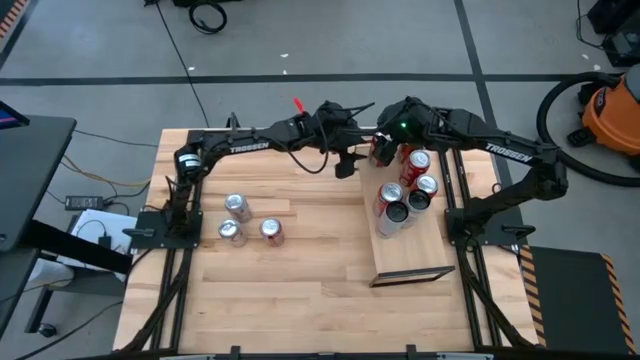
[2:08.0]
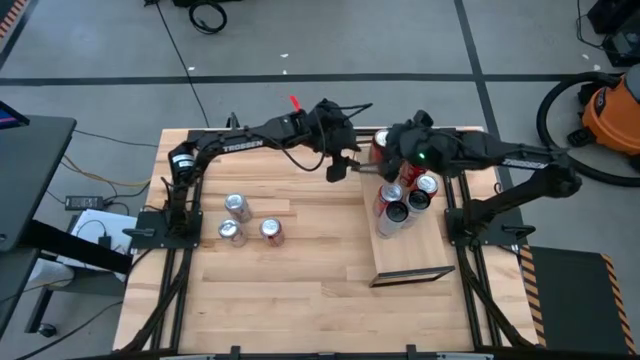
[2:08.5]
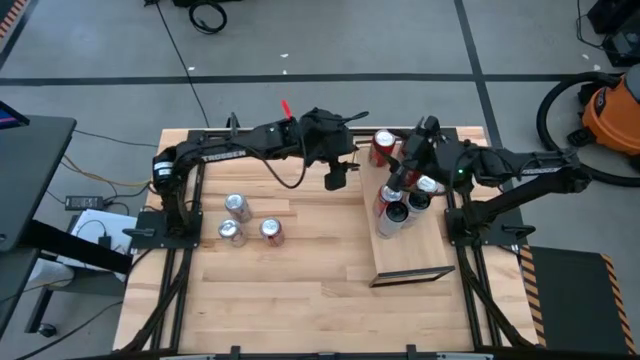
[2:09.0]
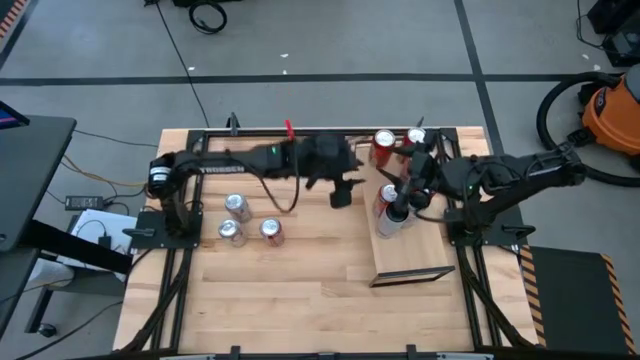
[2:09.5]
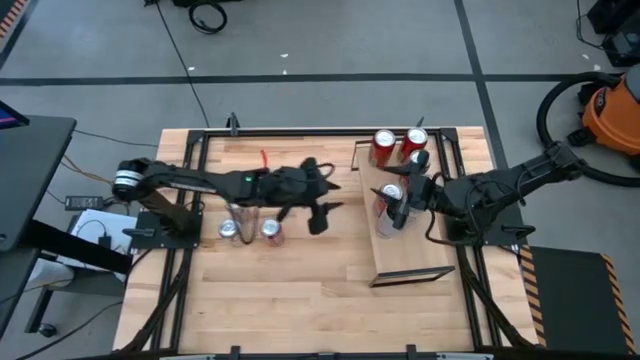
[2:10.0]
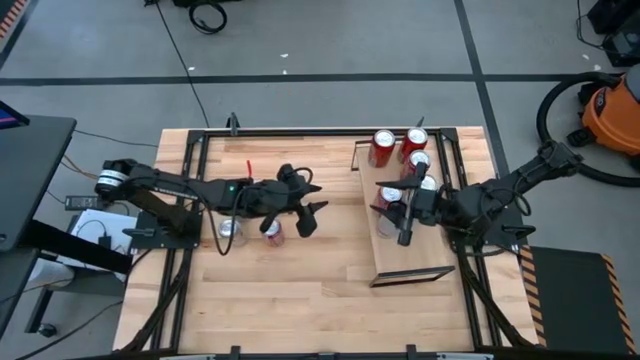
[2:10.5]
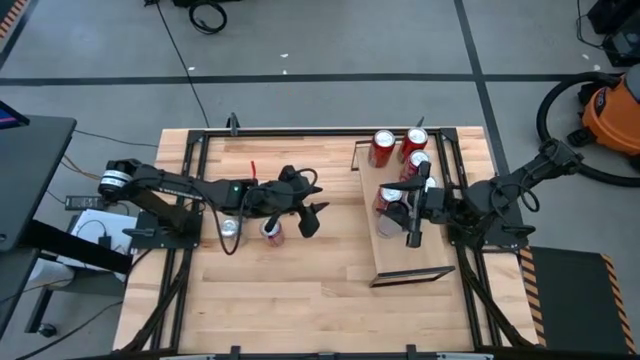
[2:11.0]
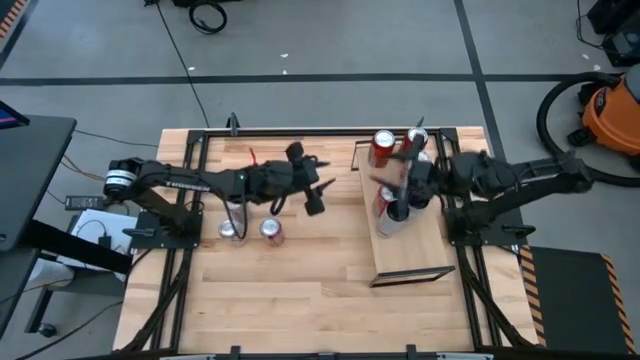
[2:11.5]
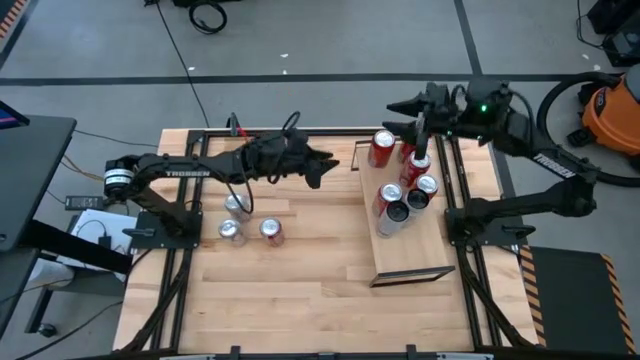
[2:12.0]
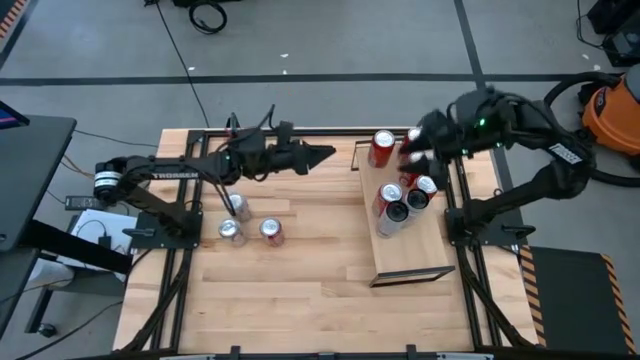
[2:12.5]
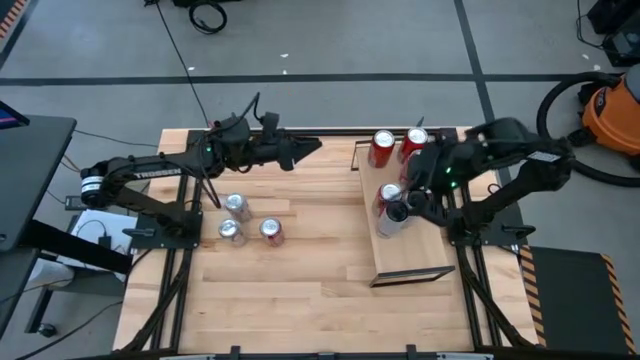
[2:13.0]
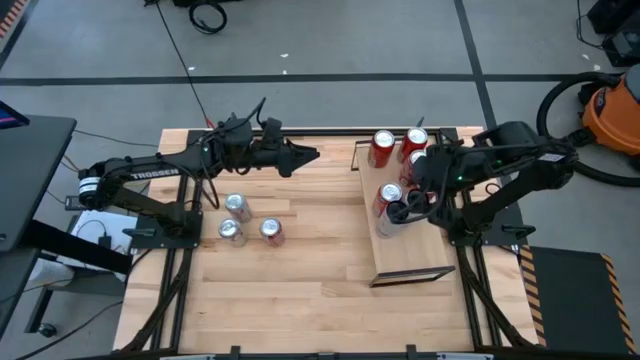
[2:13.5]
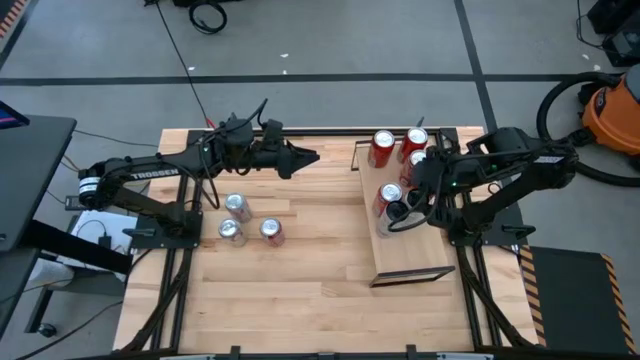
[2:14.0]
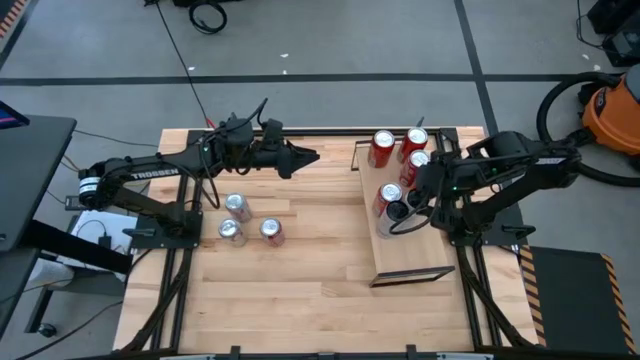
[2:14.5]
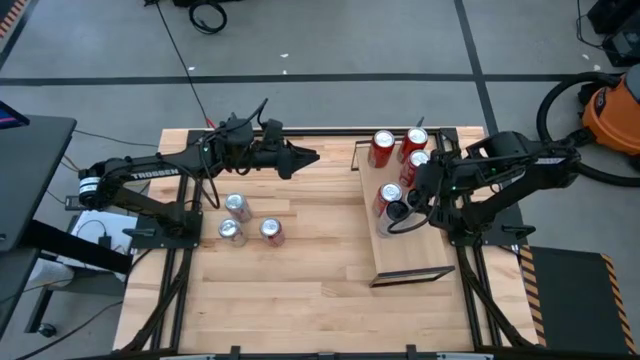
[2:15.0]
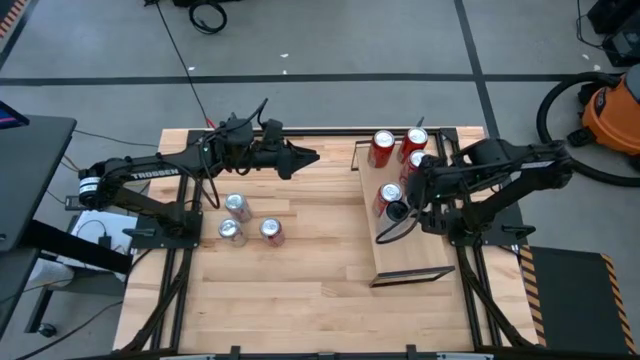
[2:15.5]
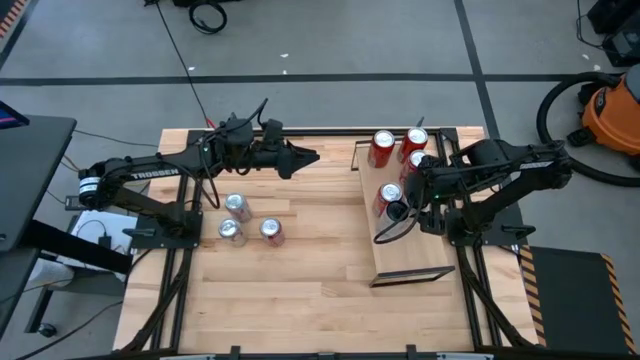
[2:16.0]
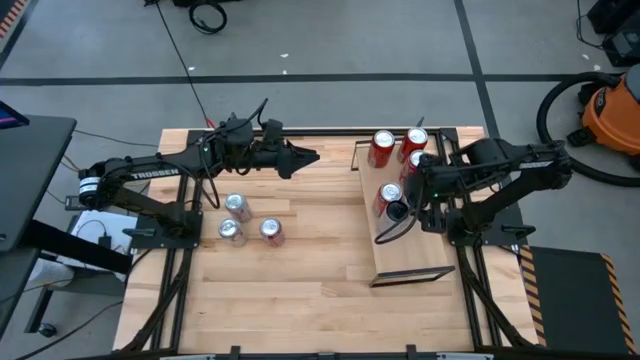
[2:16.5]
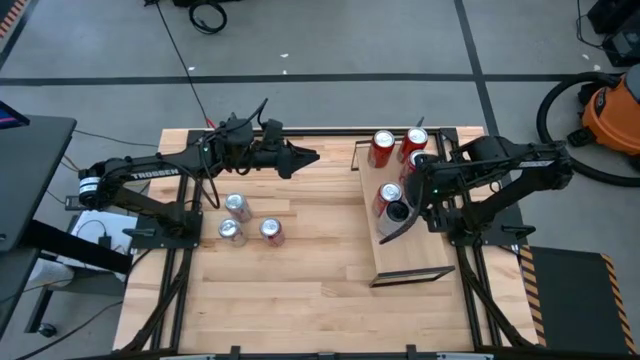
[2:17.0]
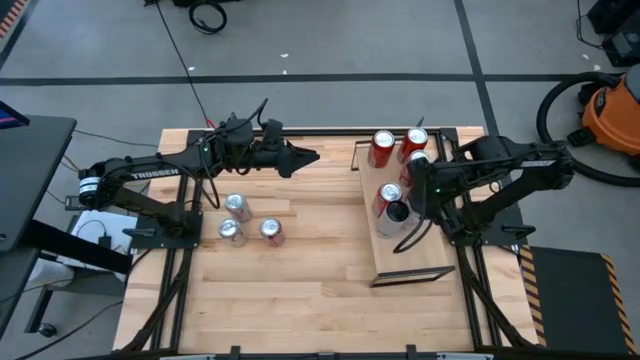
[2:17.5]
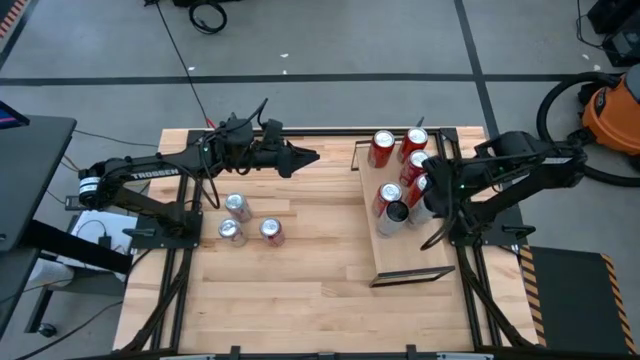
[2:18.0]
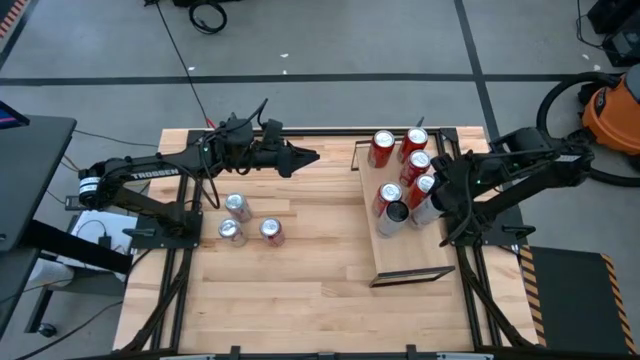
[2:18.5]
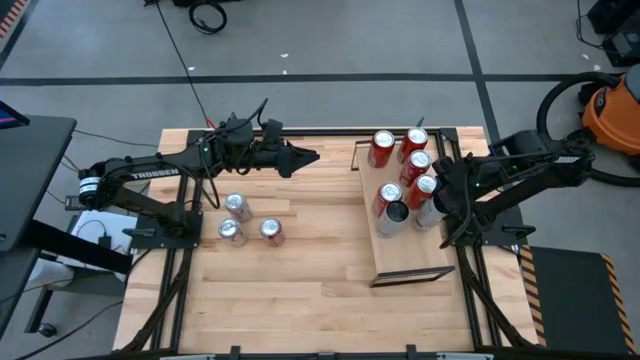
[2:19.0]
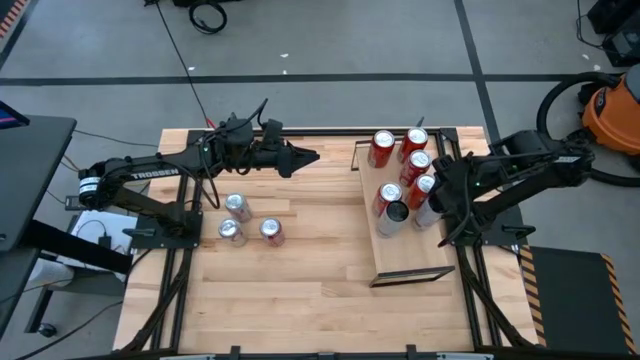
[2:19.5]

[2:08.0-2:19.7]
Task: Place canned beverage on shelf
Adjust the white pink soda can on the shelf

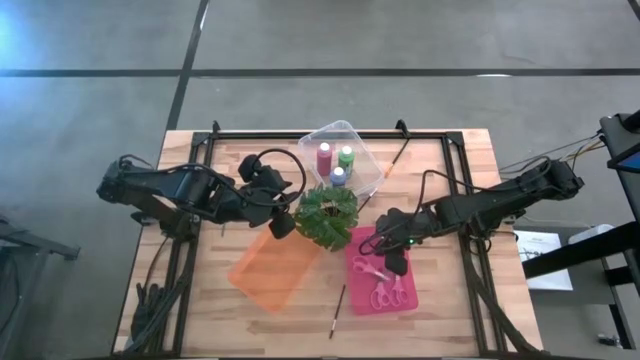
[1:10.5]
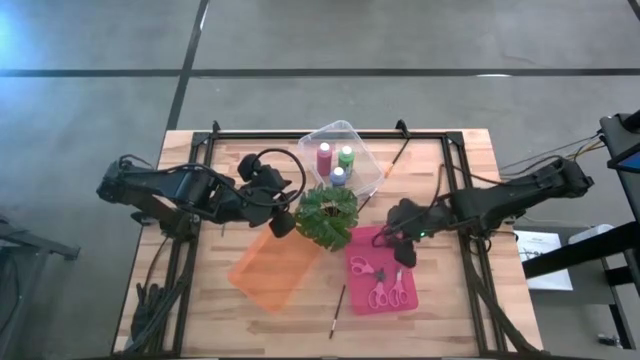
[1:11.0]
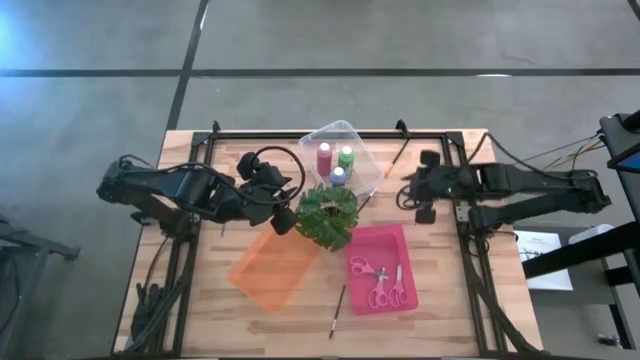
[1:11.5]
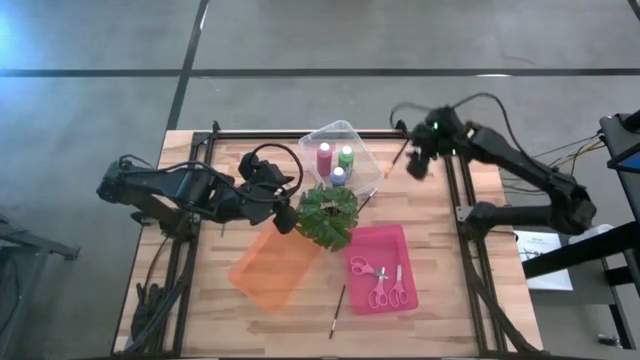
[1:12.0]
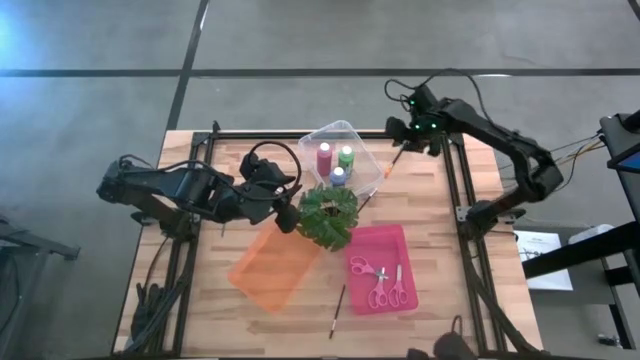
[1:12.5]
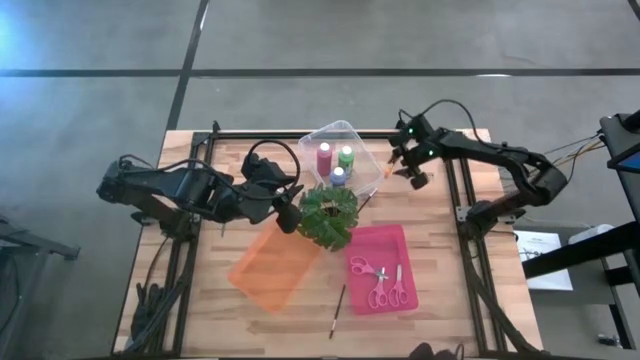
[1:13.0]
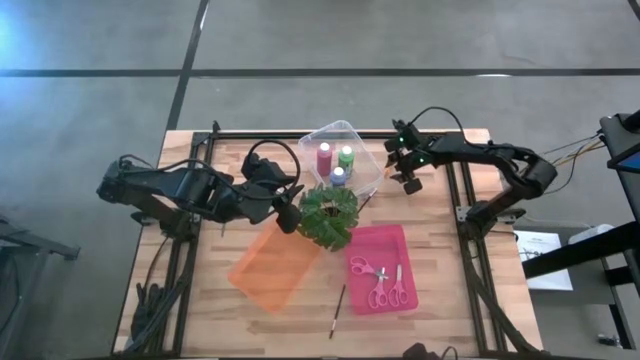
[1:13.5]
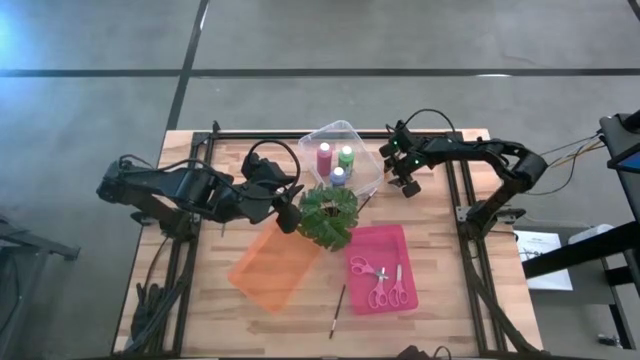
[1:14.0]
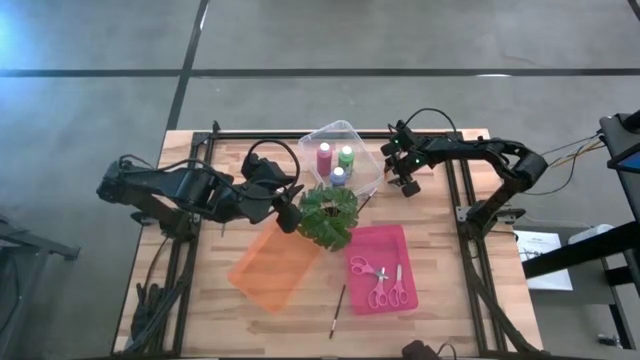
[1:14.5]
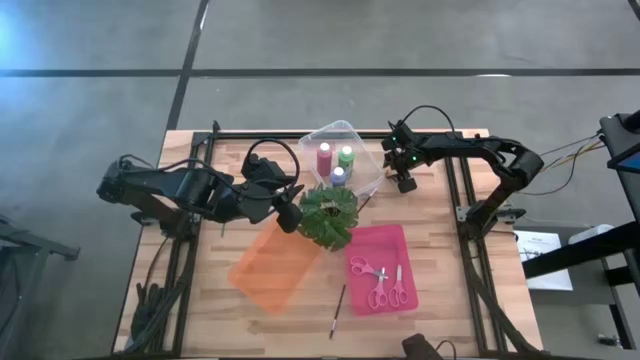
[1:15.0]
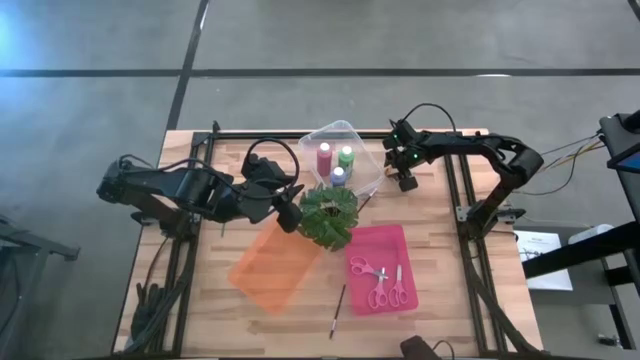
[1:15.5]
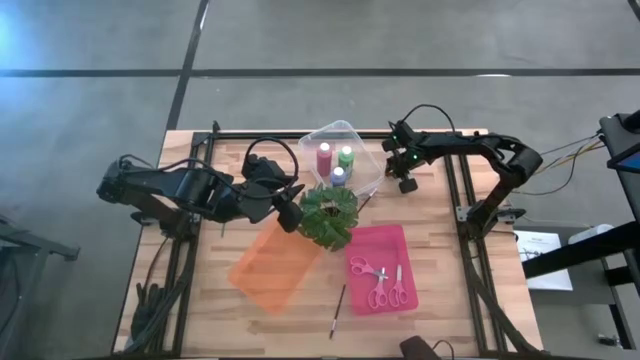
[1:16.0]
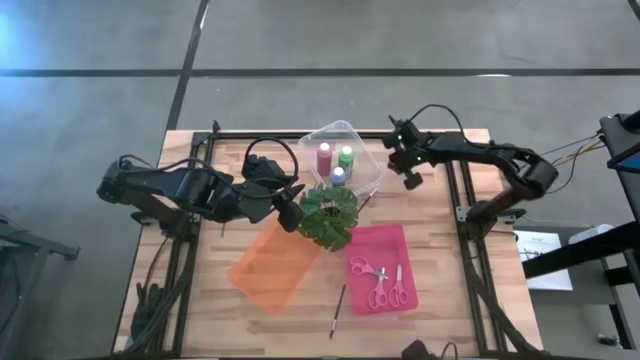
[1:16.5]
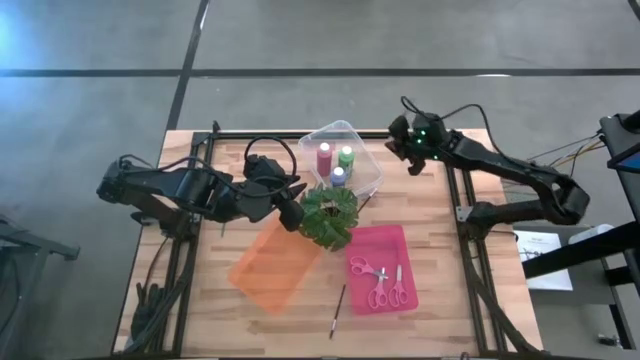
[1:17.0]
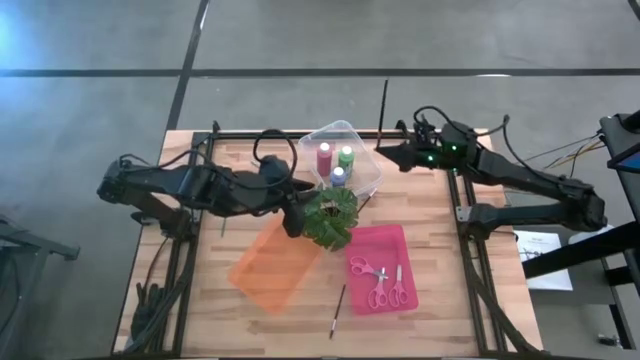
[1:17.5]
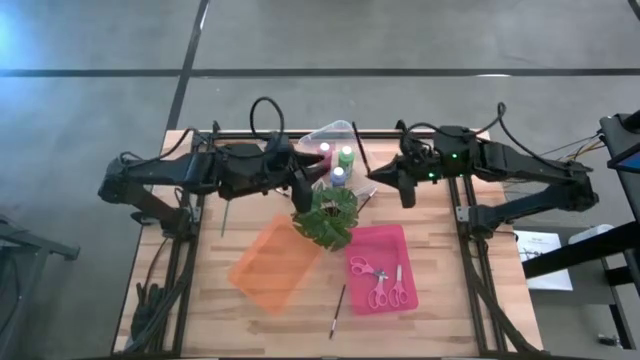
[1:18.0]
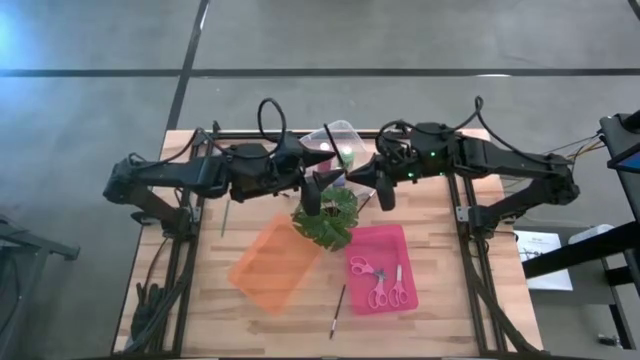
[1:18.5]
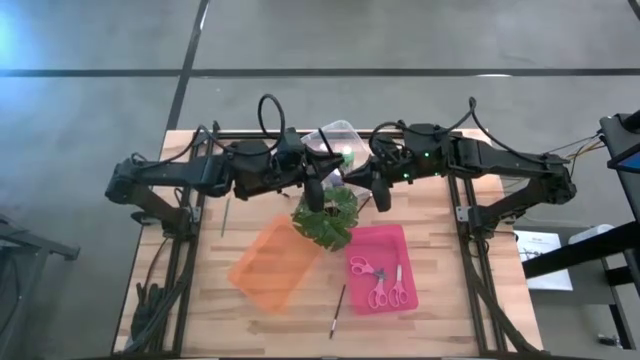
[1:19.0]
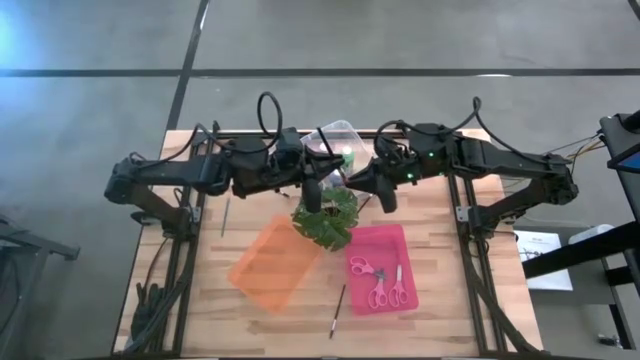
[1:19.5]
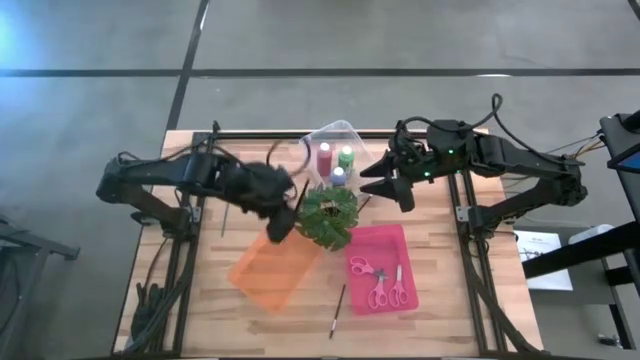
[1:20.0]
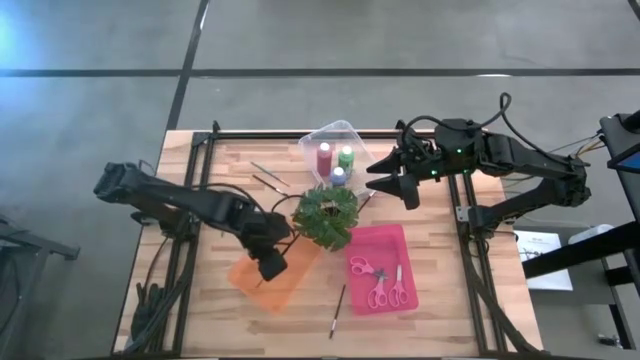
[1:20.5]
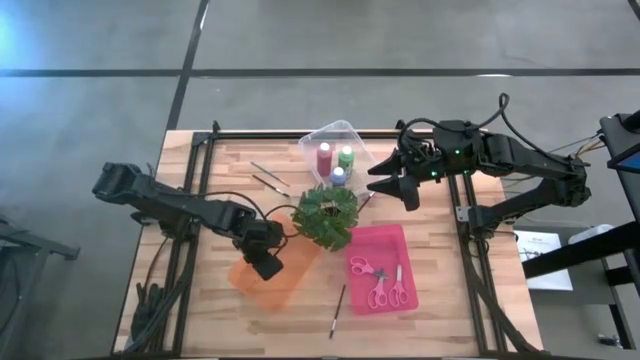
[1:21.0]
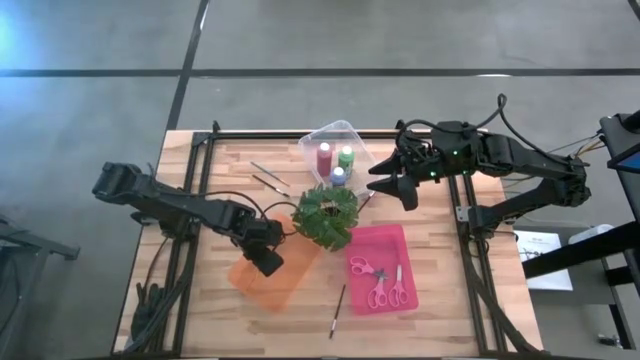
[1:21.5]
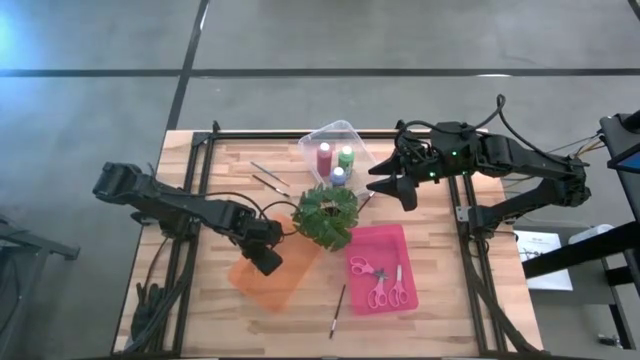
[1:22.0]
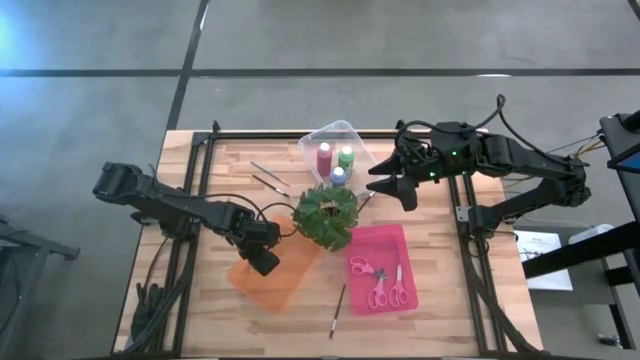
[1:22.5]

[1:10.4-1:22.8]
Task: Pick & Place Paint Supplies
Put the black paint brush into the orange bin
